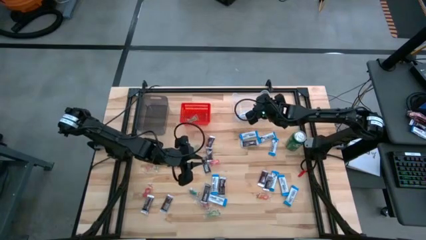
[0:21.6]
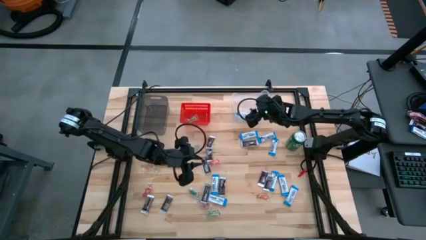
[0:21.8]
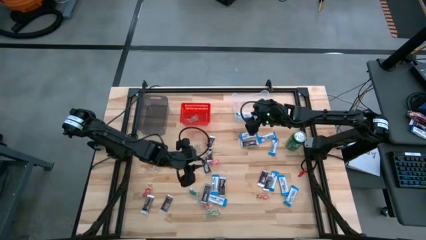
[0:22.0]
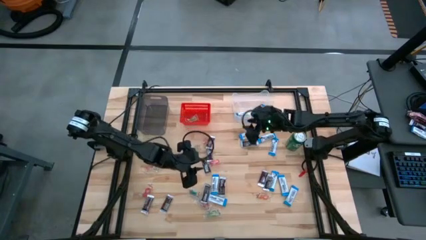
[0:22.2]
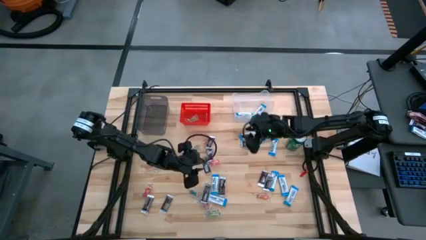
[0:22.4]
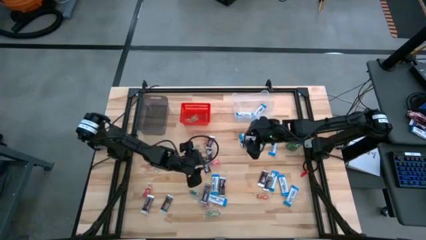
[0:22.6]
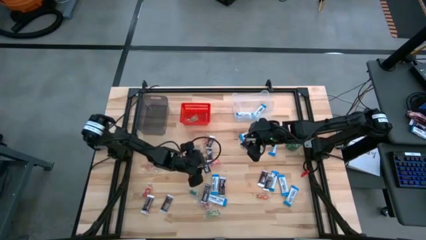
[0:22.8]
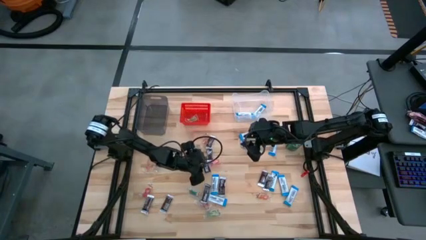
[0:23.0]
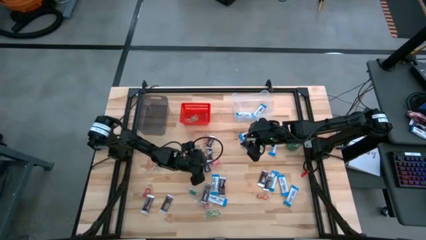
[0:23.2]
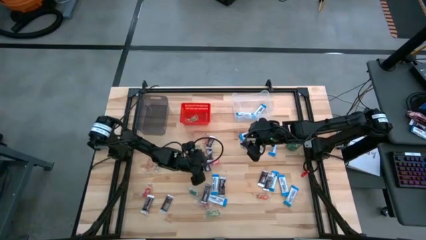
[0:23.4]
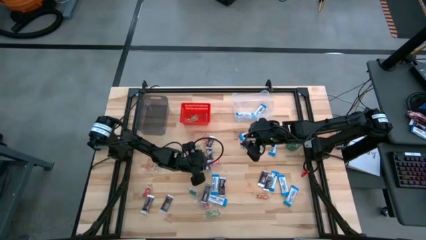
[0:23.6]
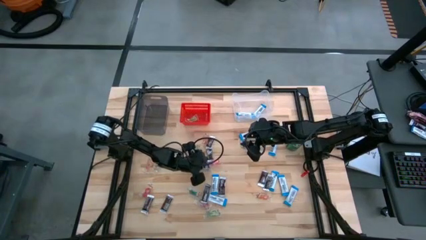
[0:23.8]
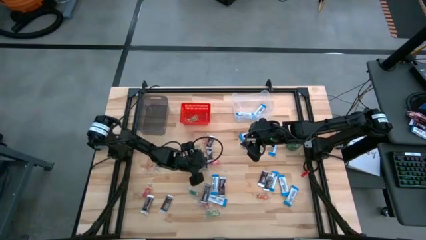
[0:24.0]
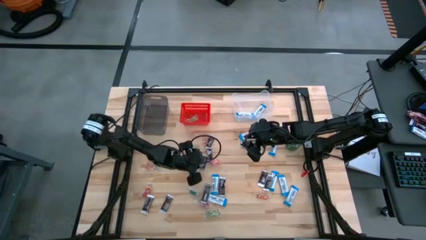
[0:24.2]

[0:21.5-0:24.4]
Task: Sort candy
Put the brown chocolate into the black bin

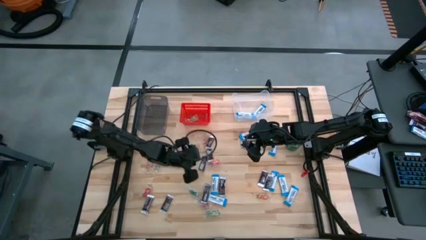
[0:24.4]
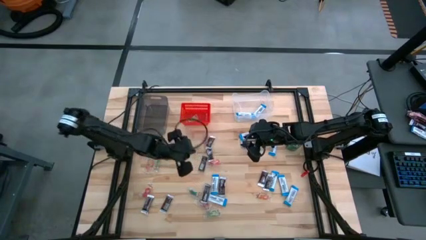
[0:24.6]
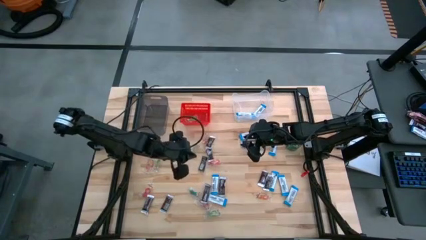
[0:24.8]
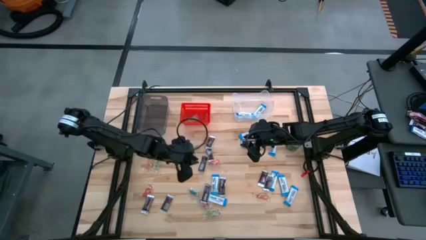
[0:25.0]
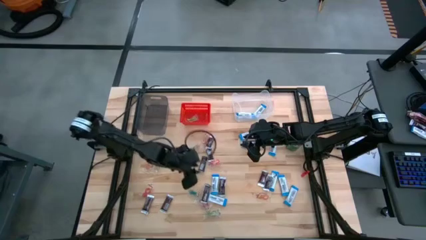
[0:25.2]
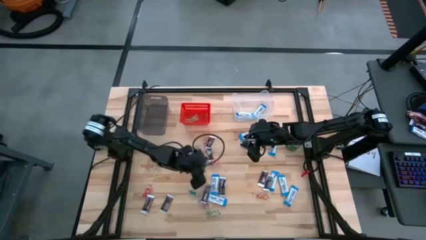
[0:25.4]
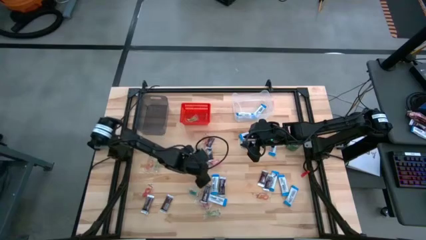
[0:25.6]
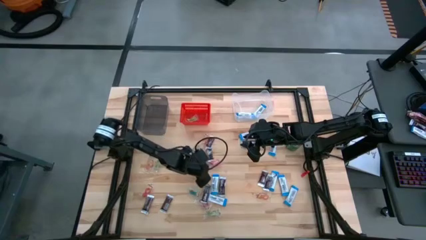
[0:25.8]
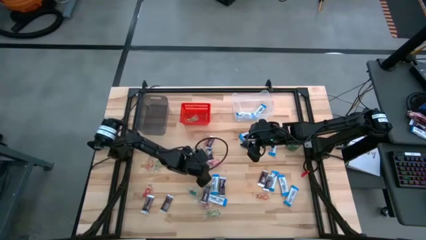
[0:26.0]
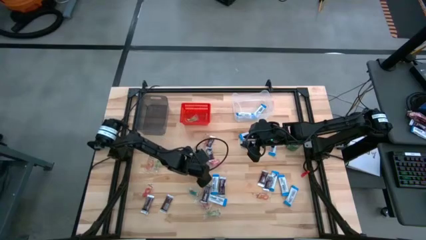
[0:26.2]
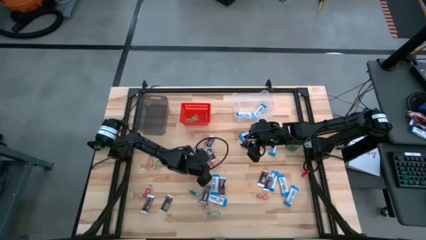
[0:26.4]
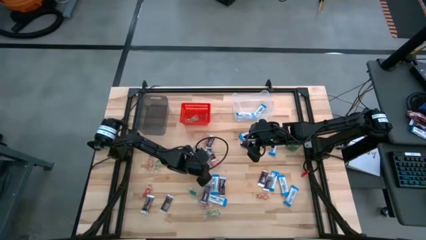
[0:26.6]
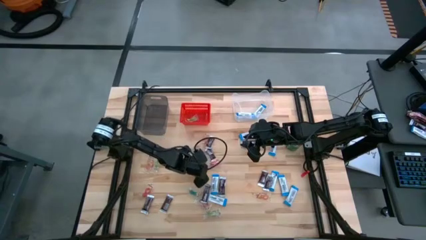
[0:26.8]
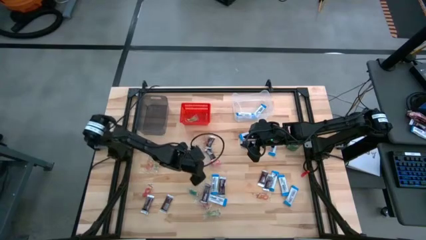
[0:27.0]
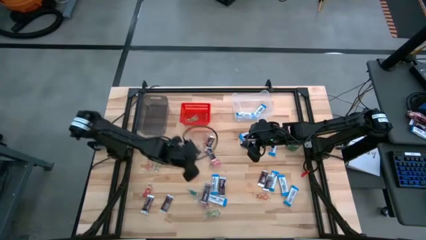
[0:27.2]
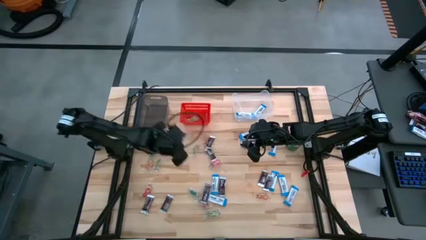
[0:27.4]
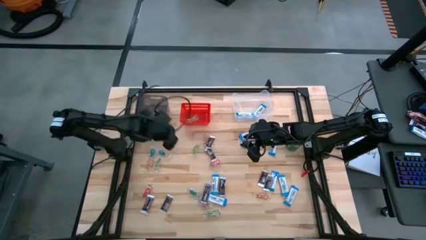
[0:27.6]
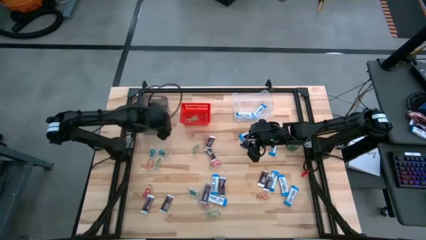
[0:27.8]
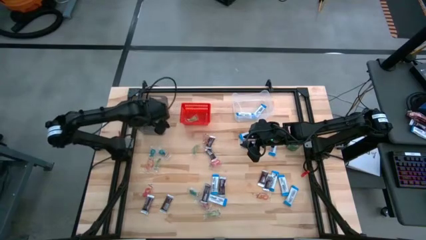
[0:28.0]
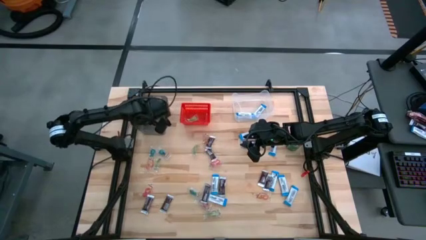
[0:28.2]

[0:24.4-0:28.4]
Put the brown chocolate into the black bin

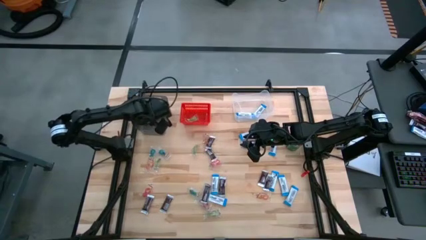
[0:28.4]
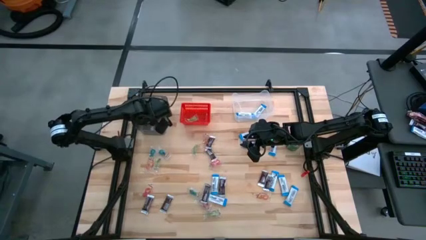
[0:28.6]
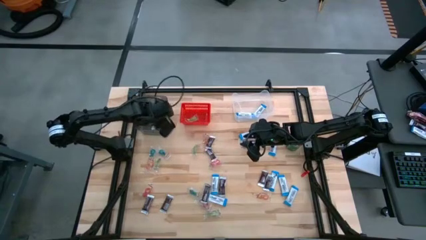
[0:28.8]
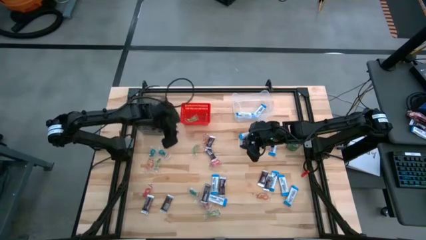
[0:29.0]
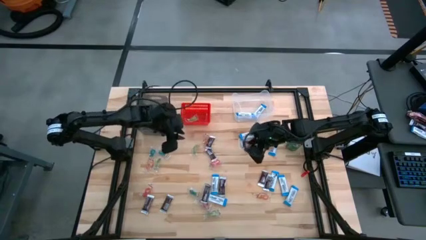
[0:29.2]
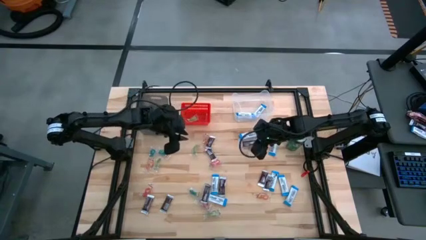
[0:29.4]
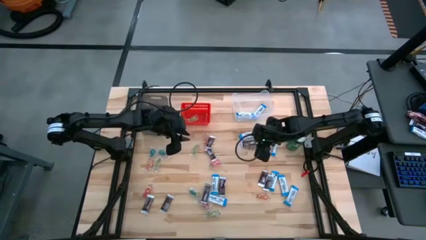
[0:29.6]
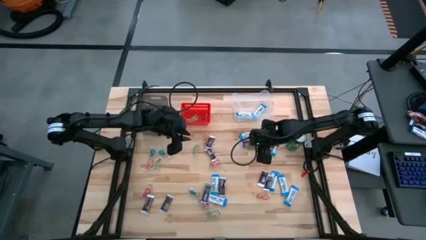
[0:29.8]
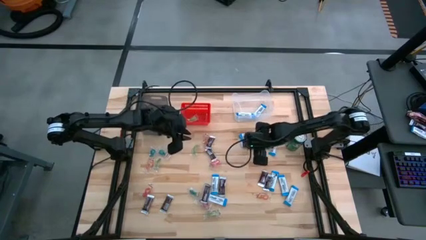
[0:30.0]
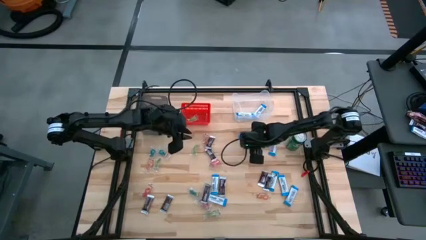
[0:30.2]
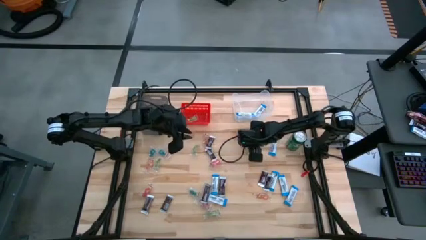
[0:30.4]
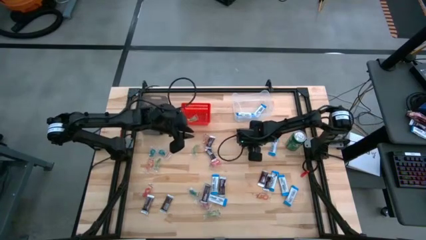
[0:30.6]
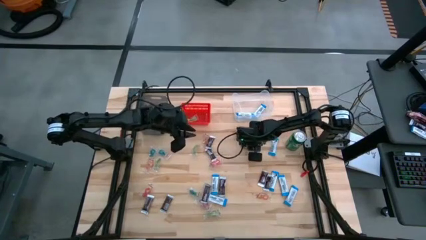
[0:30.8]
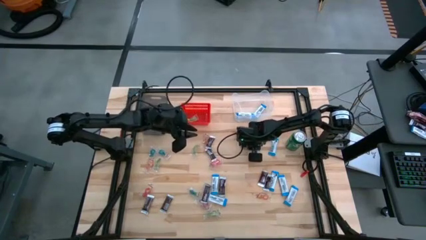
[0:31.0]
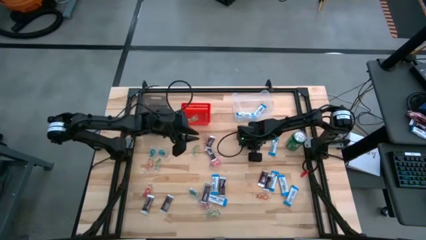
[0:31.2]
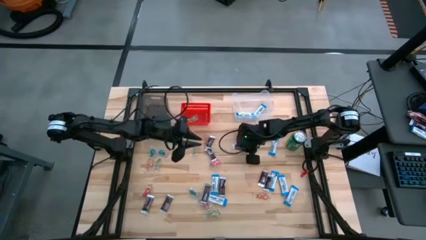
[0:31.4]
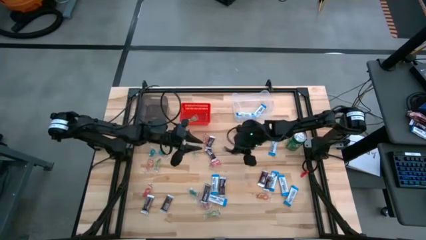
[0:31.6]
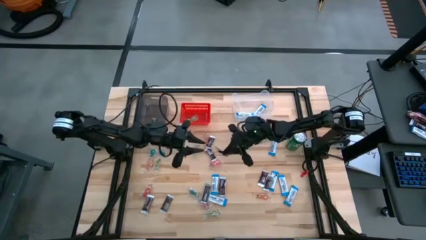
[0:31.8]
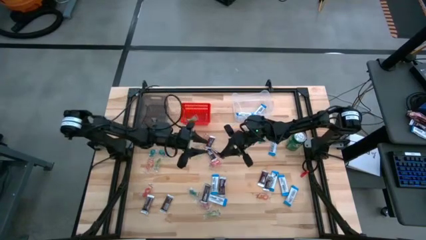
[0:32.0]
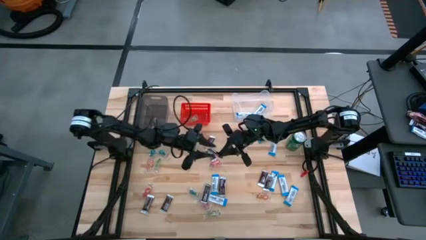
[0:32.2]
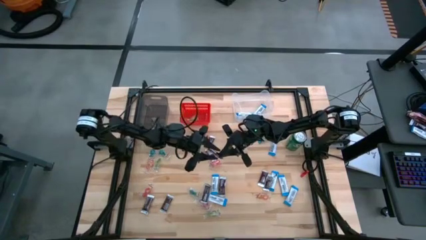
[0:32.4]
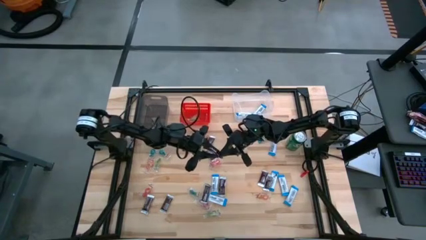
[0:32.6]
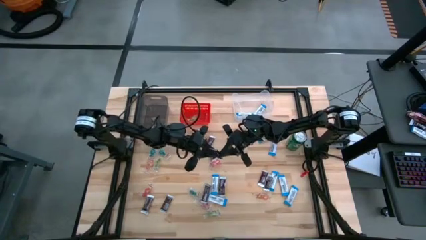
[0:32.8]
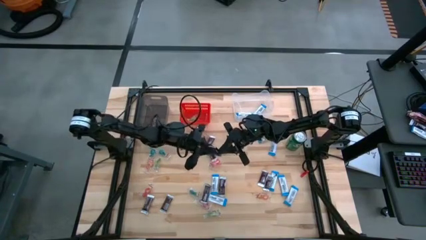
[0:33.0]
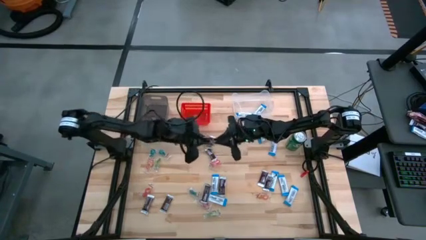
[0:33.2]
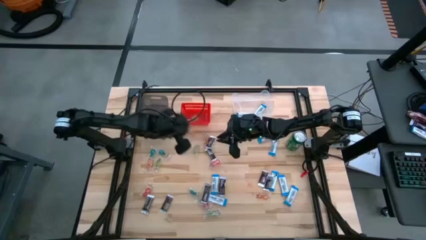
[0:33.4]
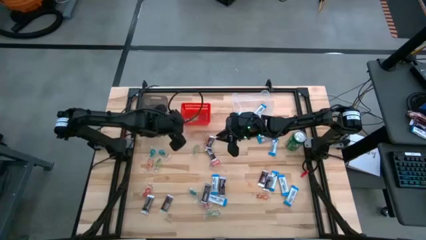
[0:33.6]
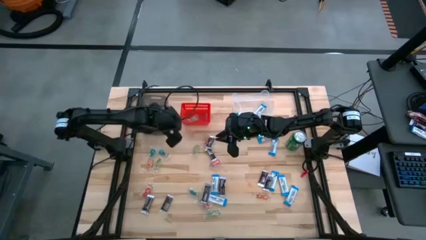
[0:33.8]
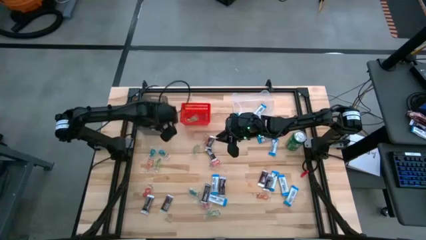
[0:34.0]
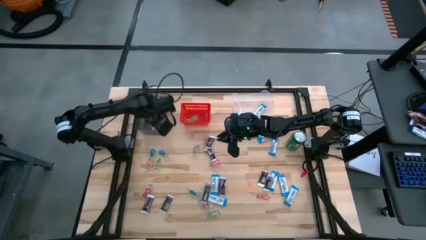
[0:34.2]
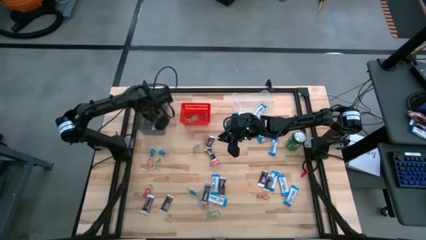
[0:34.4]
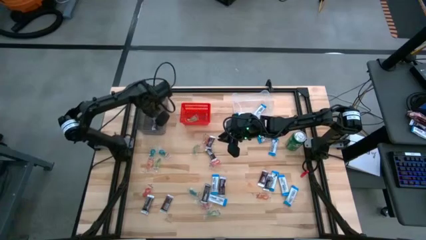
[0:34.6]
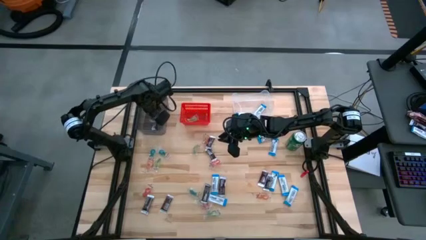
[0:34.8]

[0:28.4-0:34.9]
Put the brown chocolate into the black bin

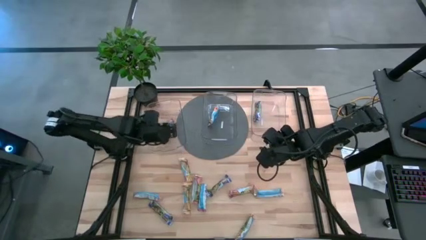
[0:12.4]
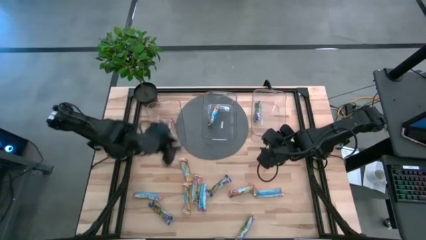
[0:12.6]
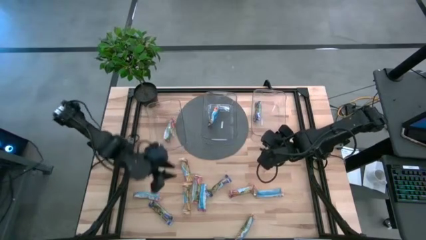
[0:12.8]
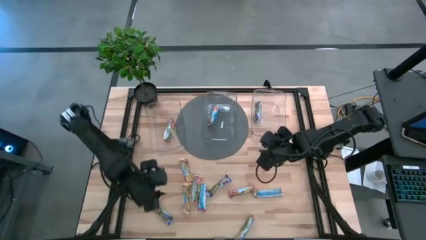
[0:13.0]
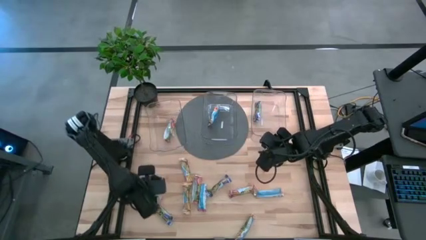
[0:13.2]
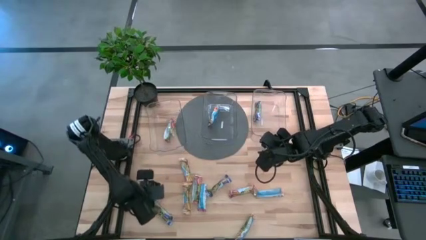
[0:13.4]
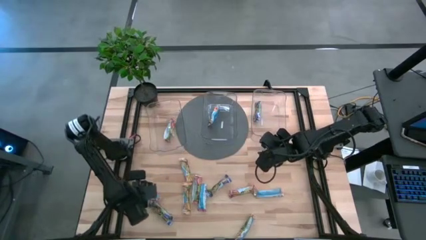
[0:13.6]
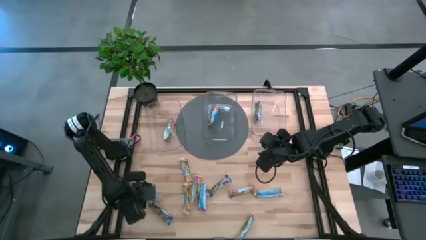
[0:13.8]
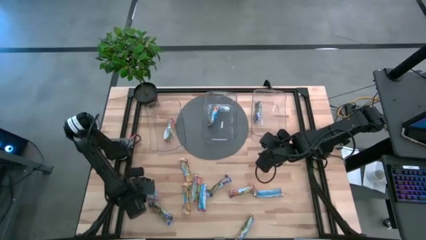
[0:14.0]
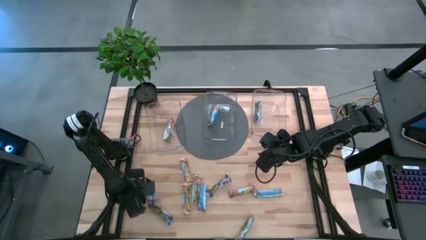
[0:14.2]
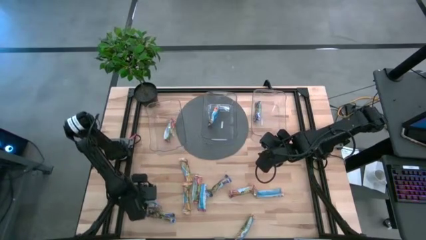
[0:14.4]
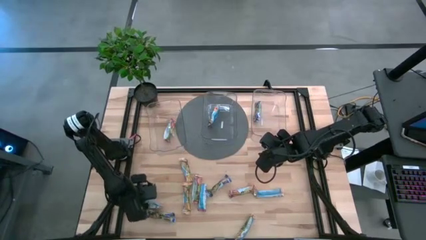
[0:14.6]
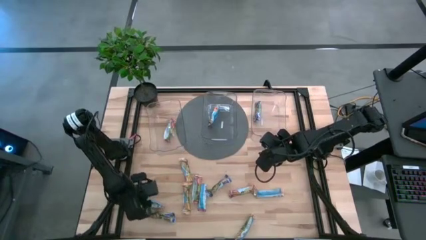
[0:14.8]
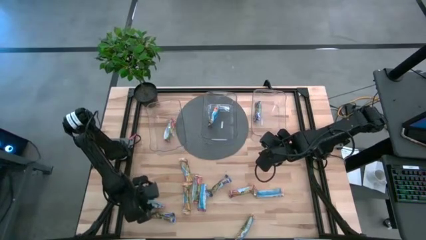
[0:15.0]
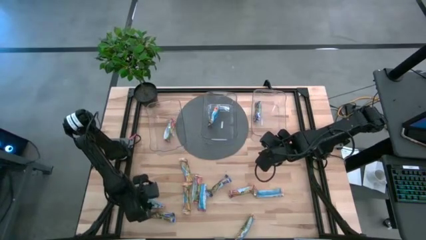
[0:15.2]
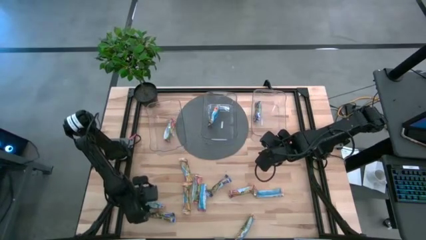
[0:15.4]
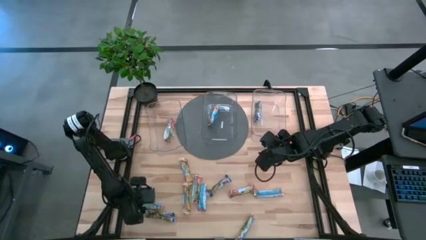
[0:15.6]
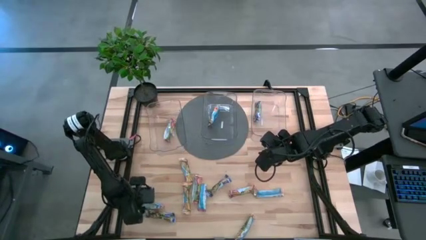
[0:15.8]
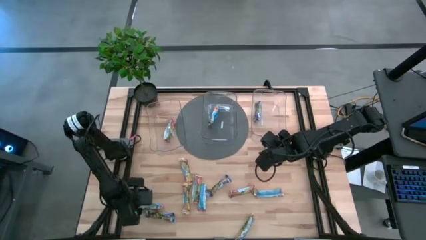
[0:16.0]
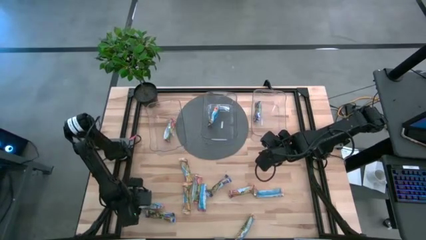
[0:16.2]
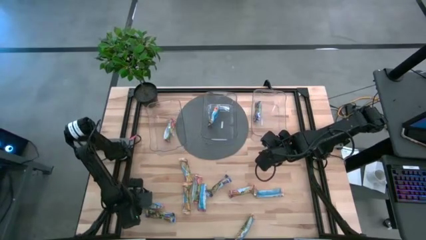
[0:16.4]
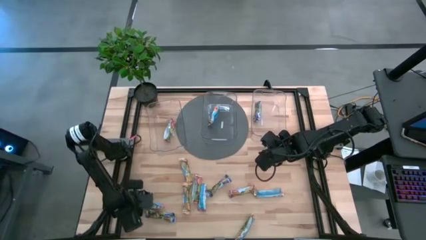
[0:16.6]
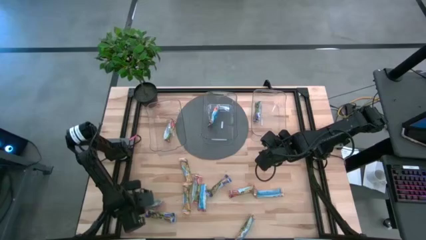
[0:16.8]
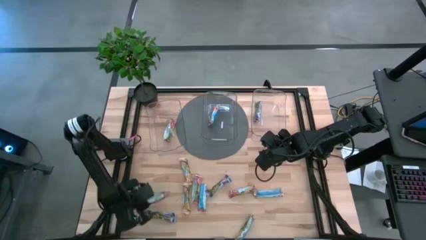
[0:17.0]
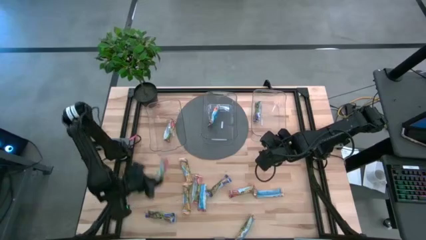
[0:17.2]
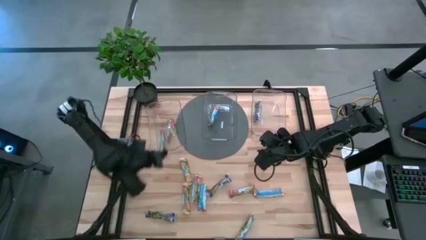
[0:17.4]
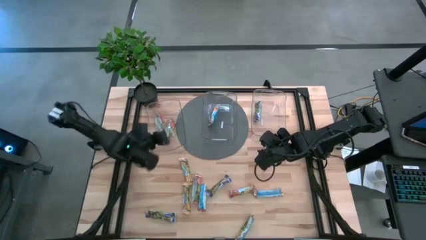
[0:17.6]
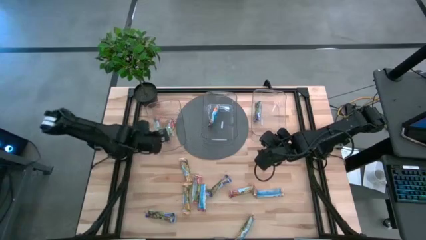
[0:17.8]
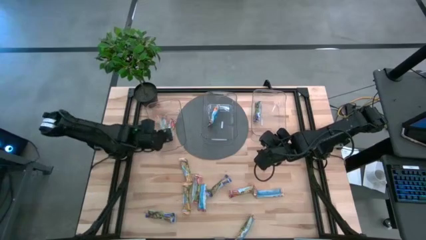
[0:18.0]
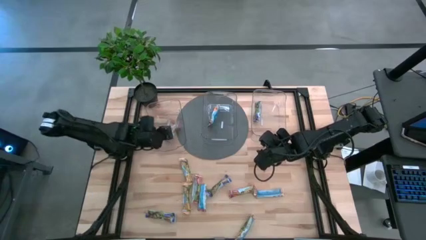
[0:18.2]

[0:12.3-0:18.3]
Task: Pick and place Granola Bars by type
Put the yellow granola bar into the left transparent bin
